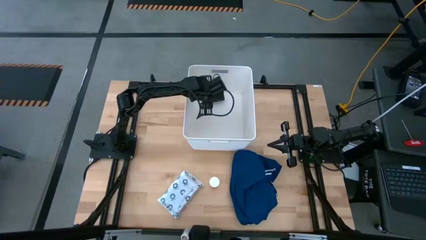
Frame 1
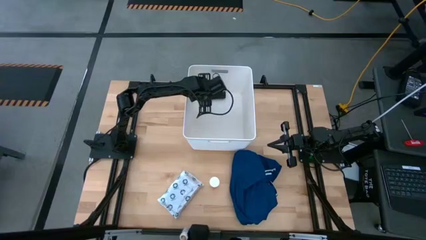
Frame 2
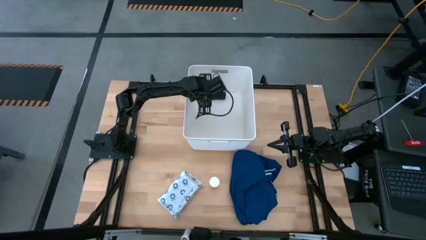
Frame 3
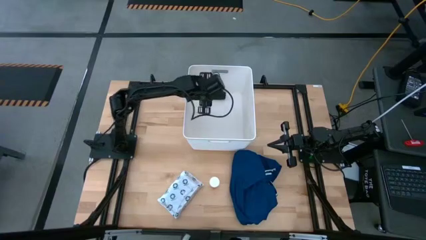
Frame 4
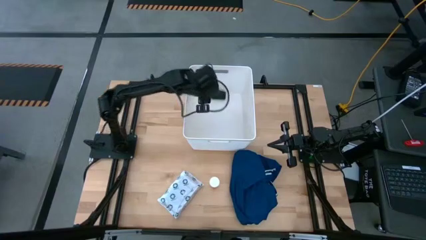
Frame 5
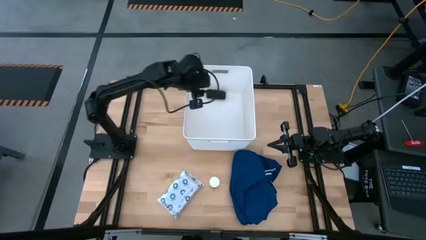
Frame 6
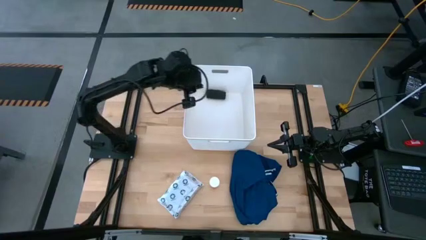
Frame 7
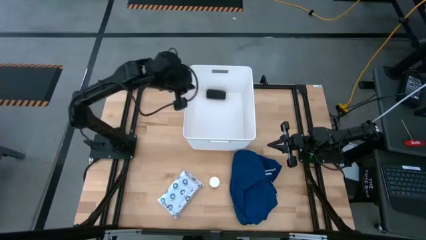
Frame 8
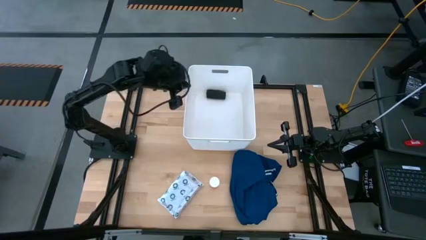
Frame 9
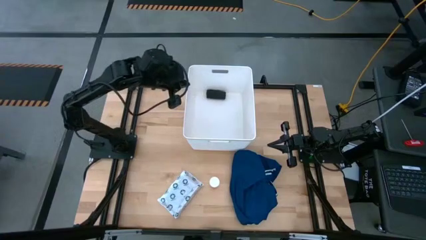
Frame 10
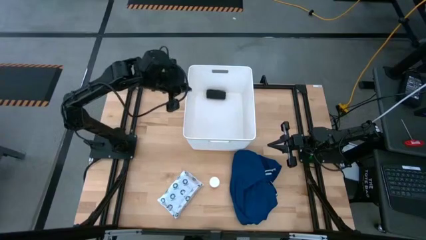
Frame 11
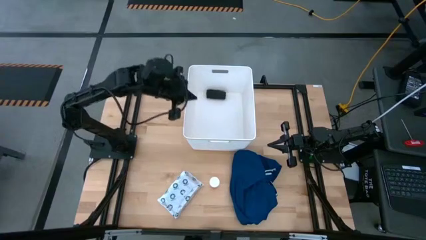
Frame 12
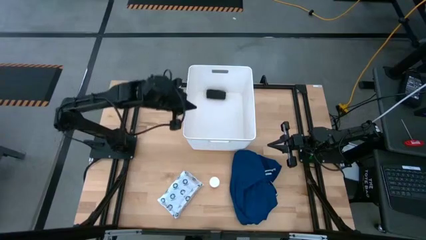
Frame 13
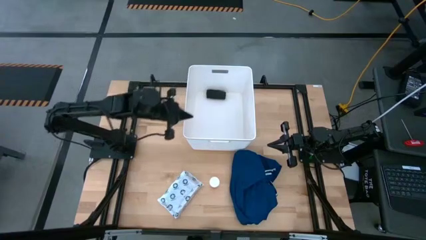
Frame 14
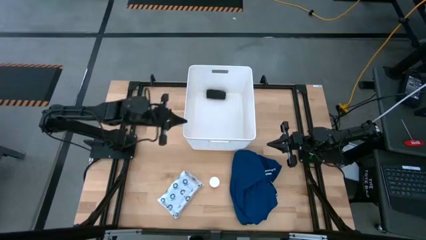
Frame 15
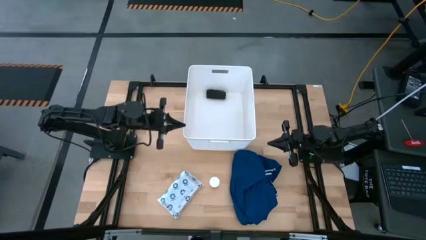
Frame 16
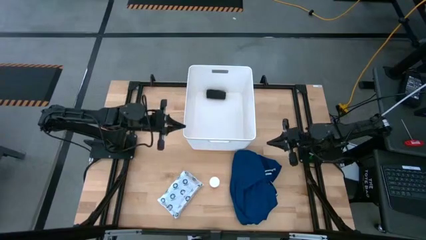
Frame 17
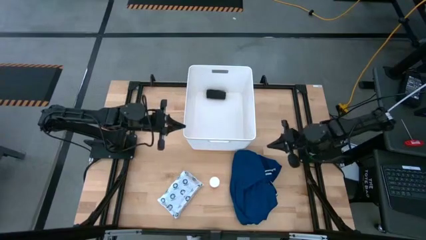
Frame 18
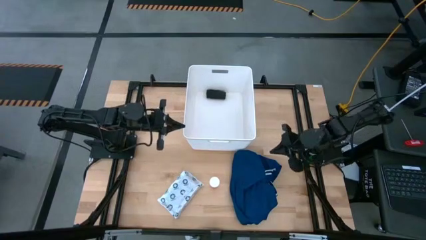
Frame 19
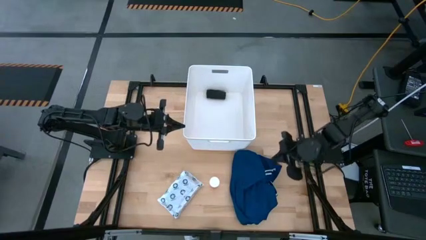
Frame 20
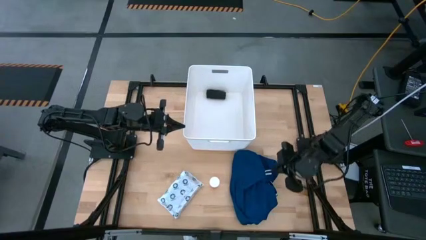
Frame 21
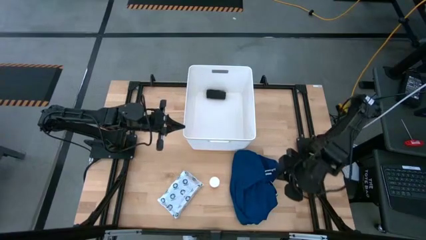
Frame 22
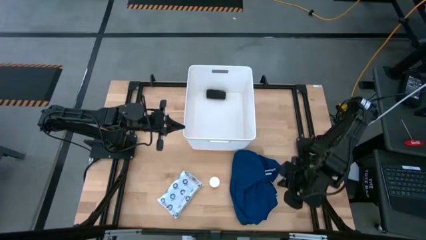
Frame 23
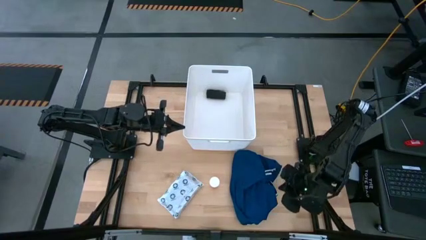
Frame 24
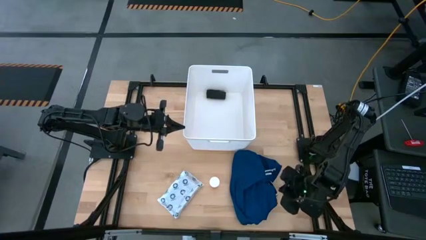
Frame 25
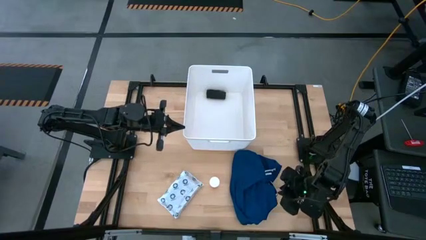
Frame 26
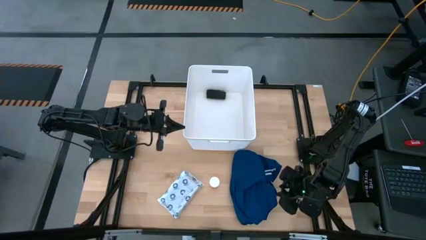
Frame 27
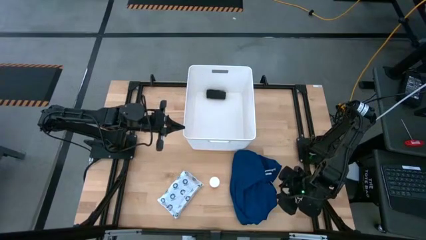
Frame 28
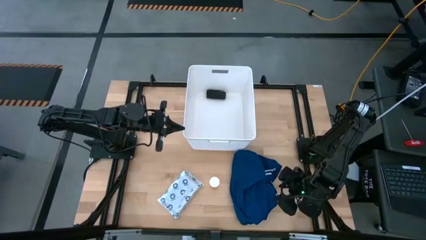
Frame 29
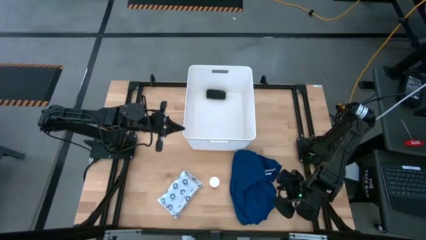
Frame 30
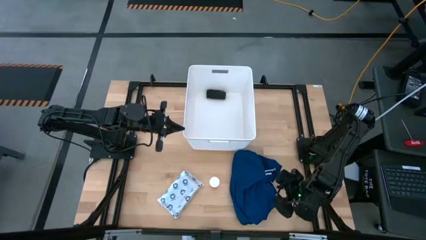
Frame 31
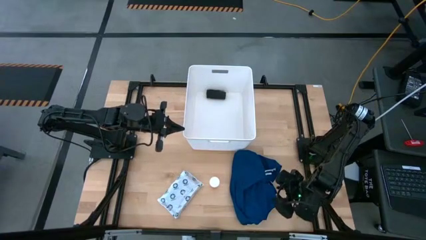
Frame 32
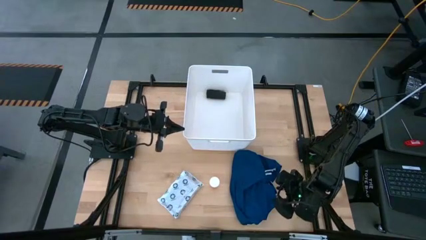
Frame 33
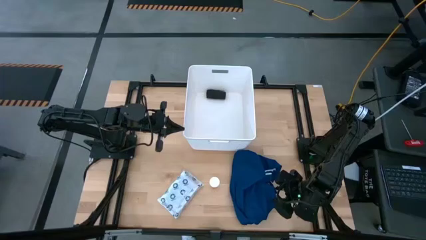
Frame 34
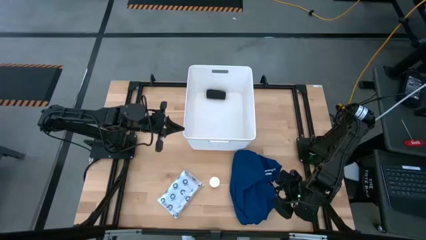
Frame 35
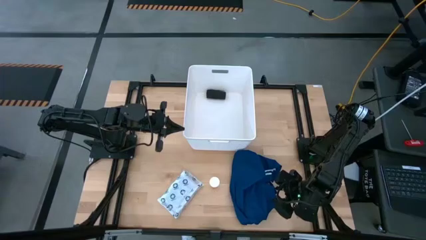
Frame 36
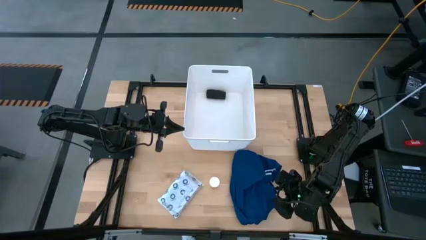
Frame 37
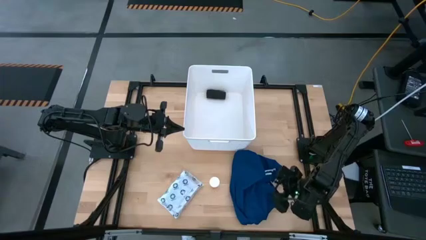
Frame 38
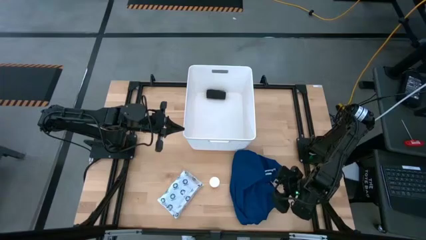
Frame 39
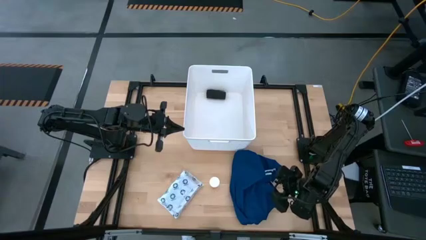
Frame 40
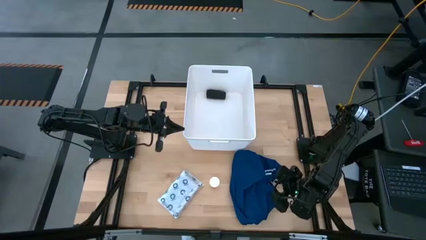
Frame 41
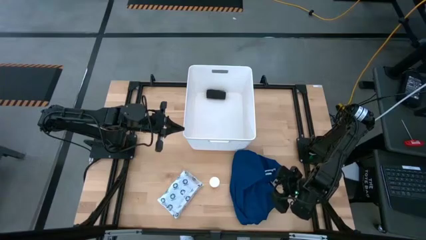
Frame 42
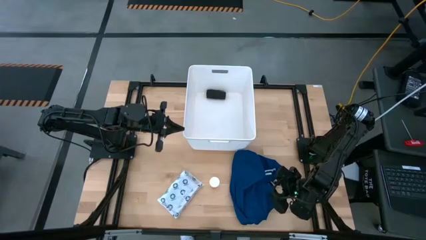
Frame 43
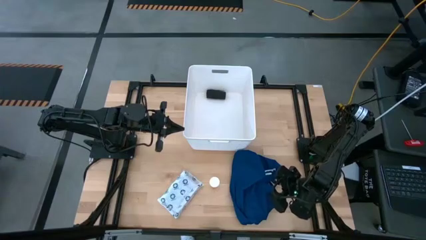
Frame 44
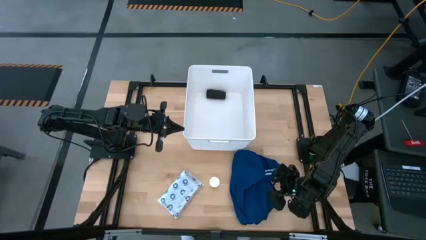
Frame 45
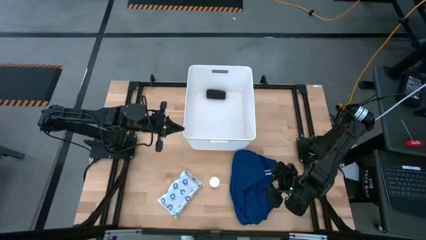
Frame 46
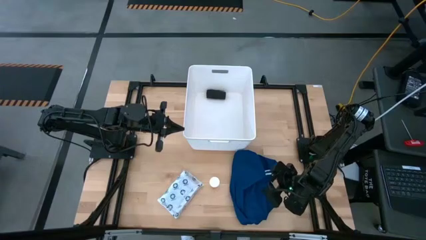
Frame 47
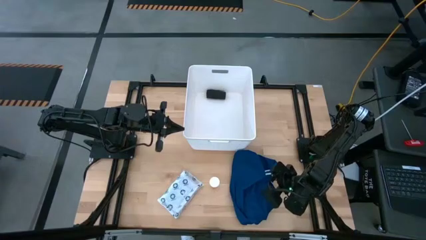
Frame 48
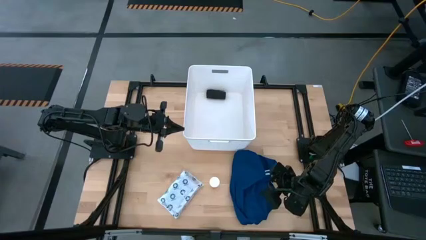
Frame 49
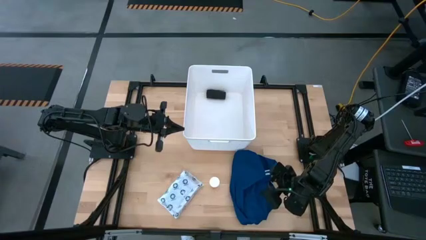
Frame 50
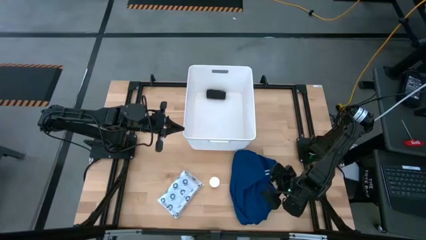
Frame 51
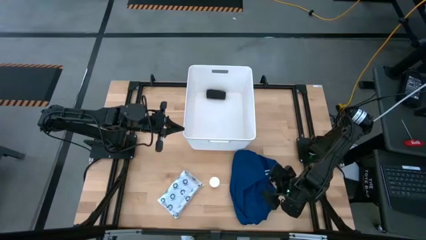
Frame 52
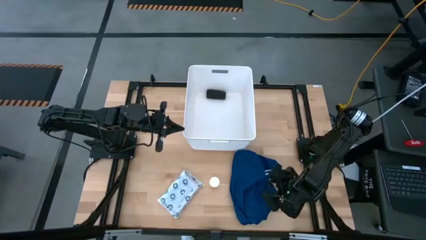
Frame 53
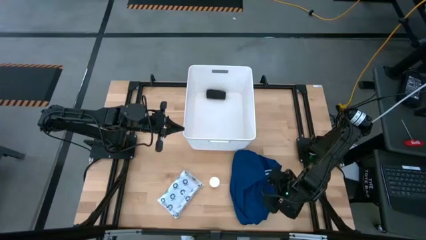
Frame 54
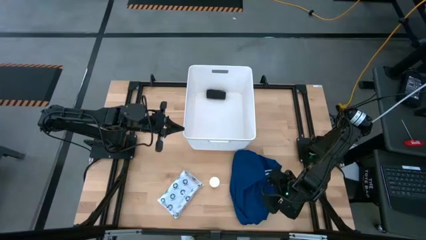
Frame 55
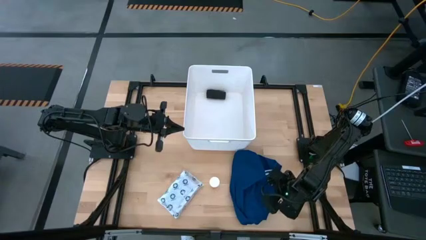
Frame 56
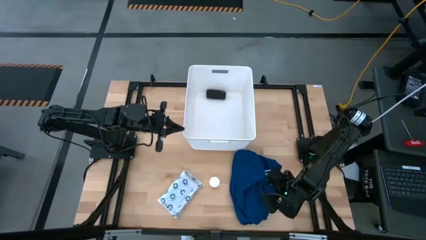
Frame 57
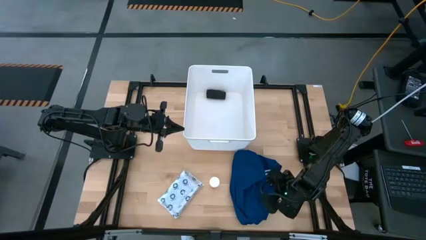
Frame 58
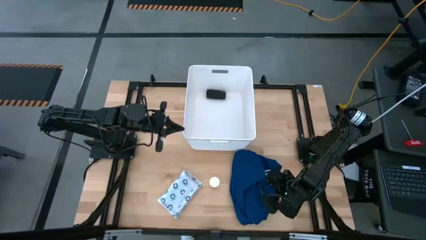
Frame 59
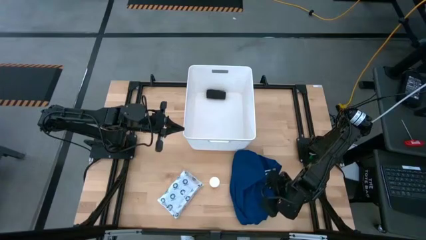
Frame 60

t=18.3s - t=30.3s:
Task: Pick & place medical supplies in basket/bin
Put the blue patient gown into the white bin

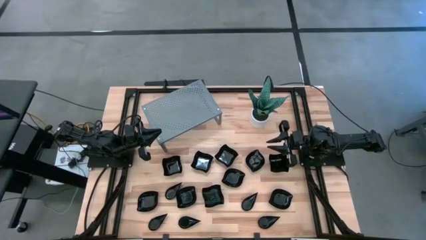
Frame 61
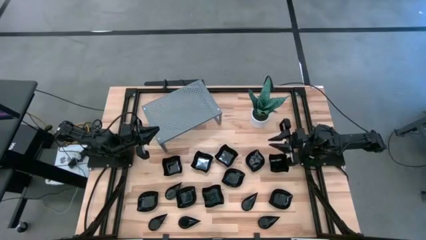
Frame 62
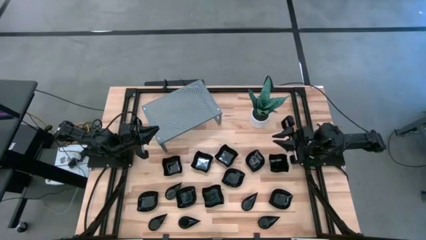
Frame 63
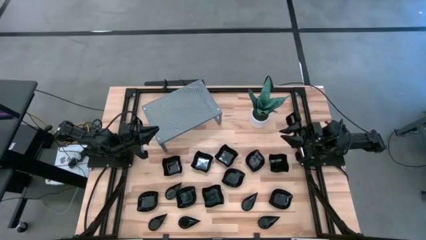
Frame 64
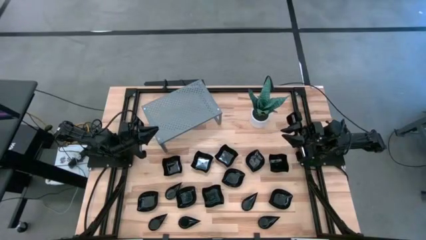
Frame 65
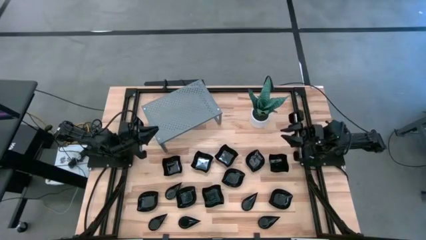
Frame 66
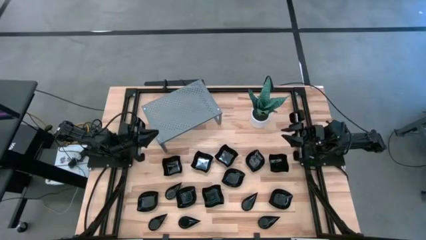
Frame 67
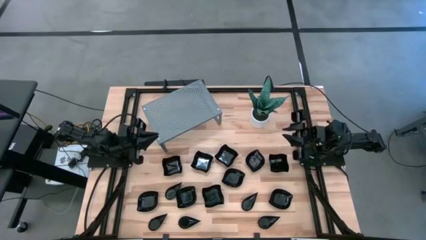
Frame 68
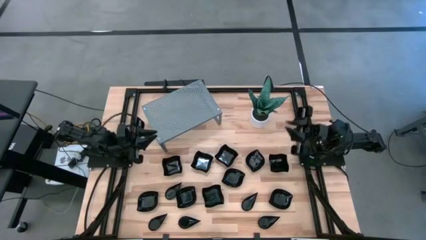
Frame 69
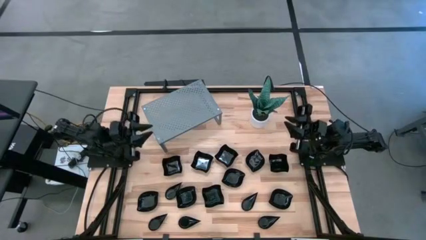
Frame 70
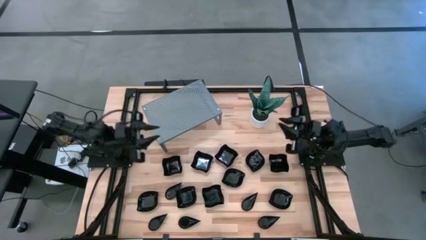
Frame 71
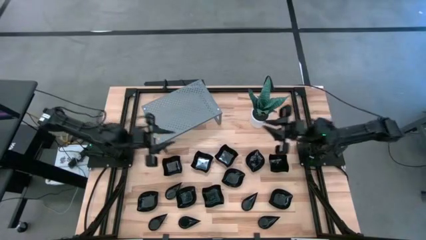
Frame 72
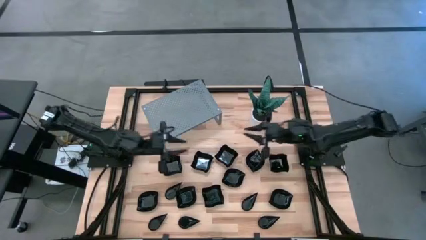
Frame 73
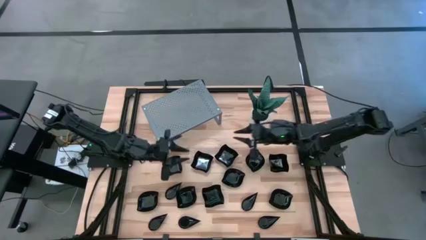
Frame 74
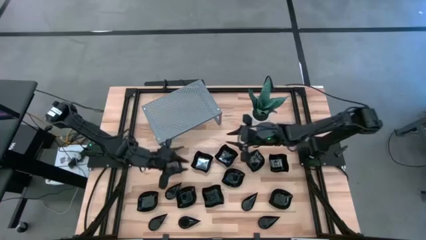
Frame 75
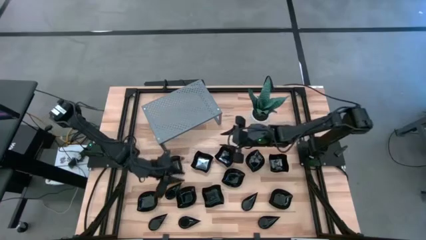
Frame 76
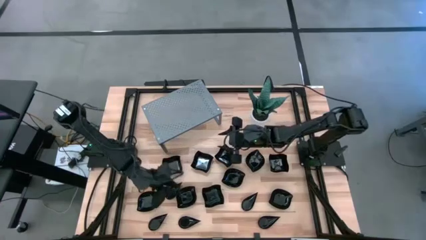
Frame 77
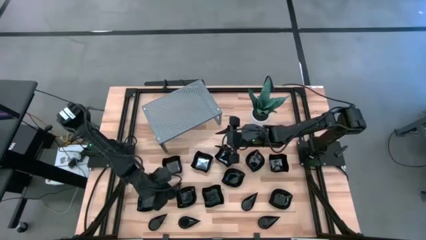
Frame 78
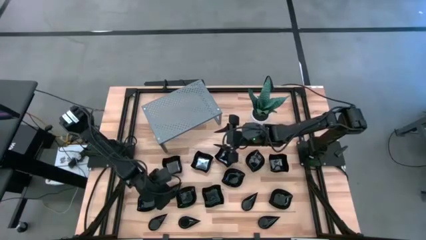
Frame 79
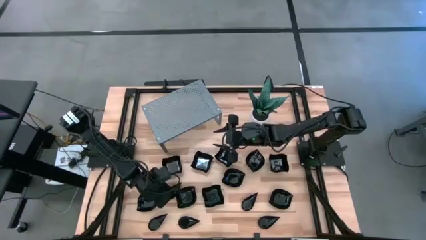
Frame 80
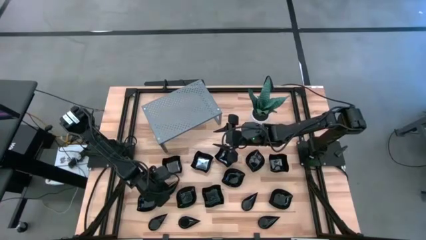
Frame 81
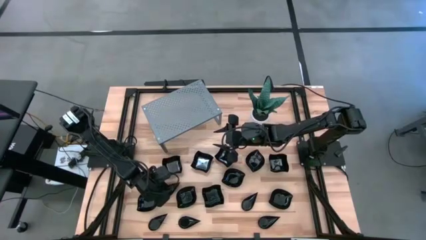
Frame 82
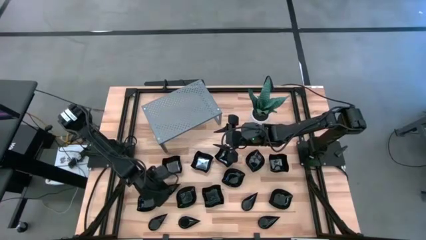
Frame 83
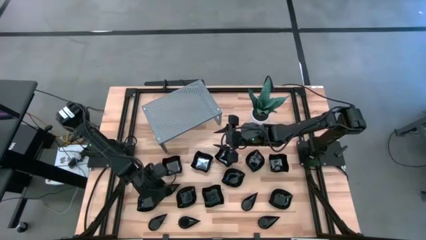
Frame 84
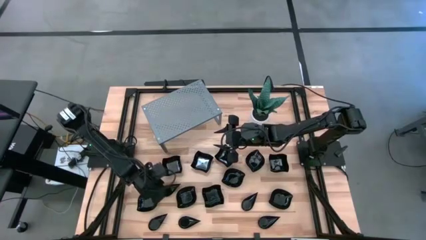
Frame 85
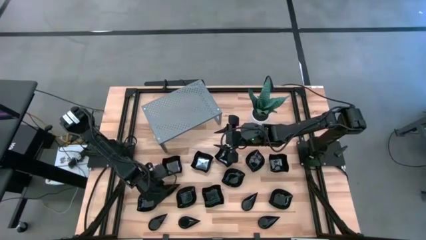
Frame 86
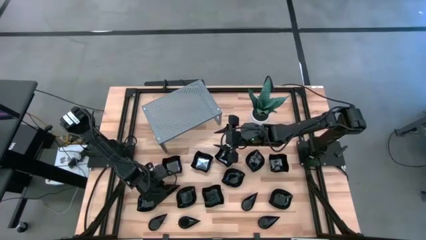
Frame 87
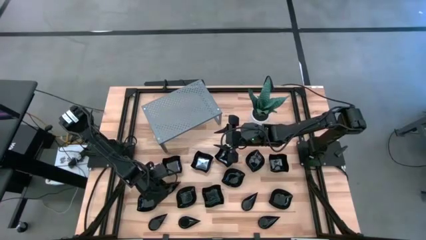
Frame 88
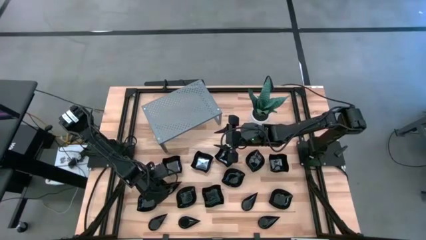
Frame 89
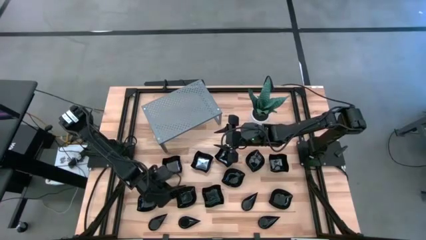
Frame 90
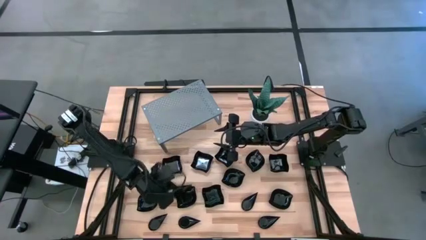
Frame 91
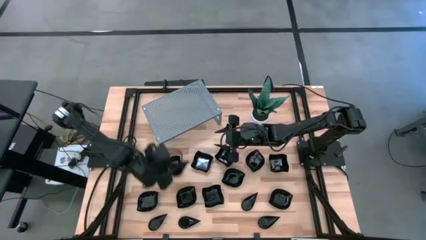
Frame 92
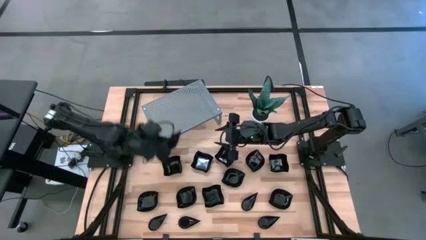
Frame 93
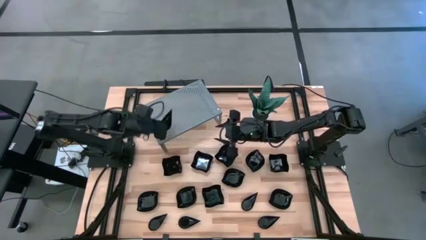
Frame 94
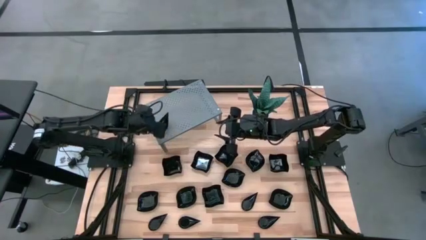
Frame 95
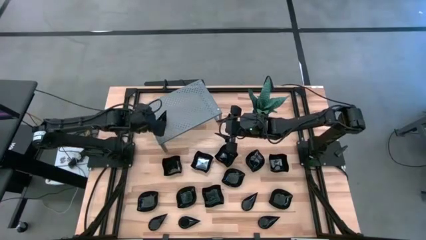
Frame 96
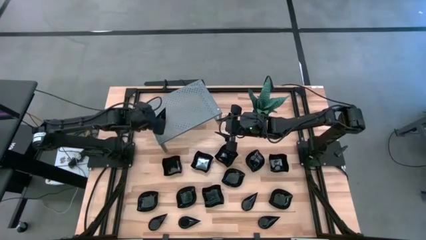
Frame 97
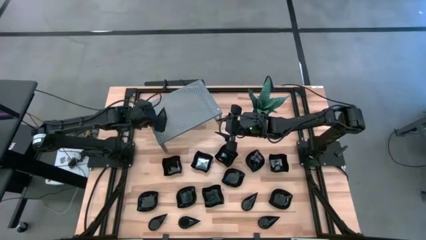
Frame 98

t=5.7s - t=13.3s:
Task: Pick & Place Mini shaped plates
Put the black drop-shaped plate on the shelf
